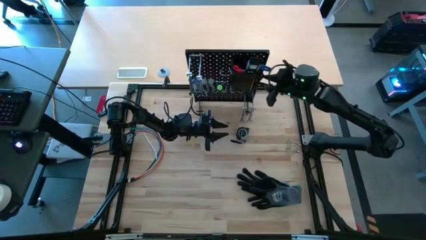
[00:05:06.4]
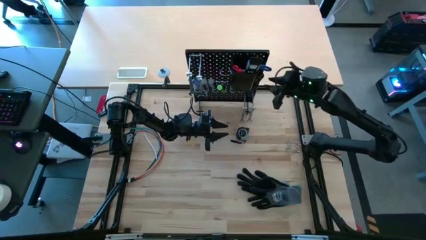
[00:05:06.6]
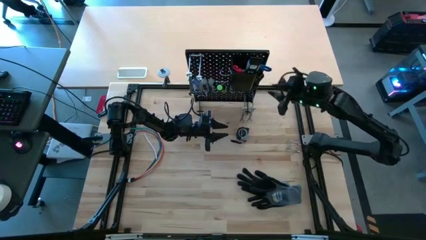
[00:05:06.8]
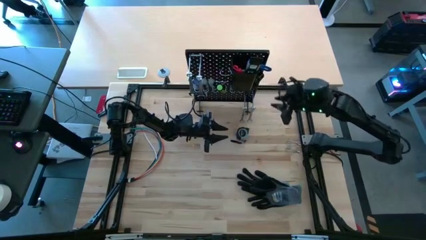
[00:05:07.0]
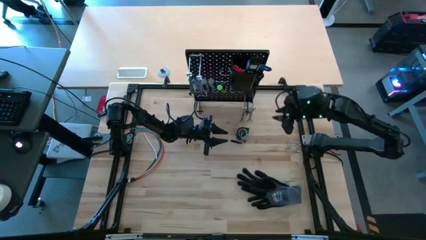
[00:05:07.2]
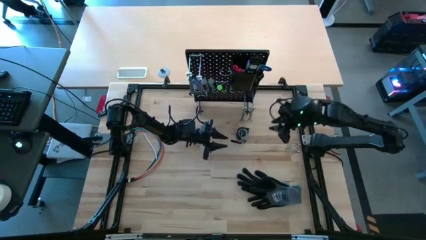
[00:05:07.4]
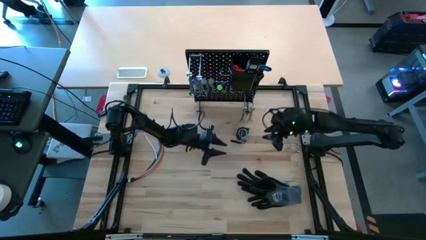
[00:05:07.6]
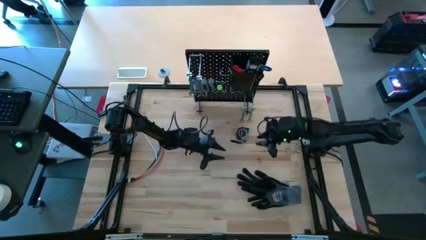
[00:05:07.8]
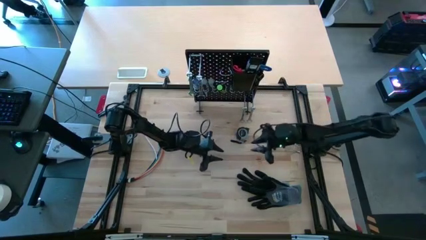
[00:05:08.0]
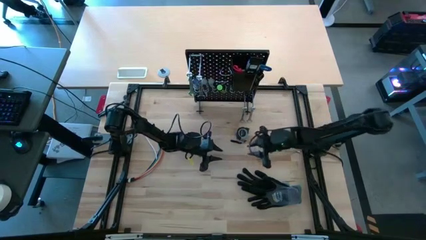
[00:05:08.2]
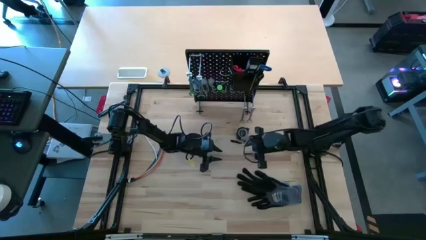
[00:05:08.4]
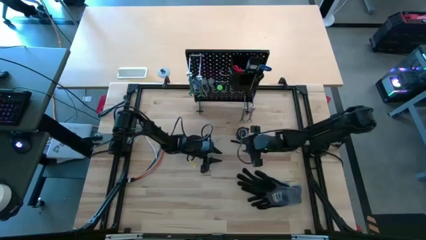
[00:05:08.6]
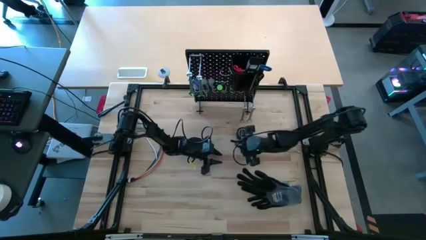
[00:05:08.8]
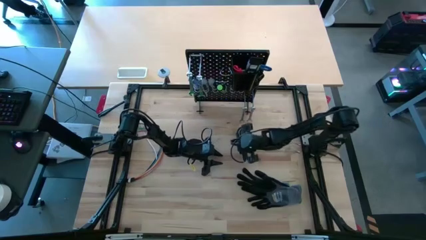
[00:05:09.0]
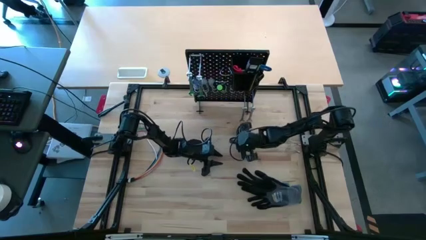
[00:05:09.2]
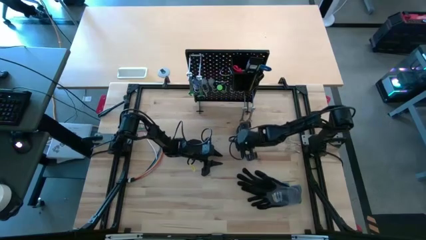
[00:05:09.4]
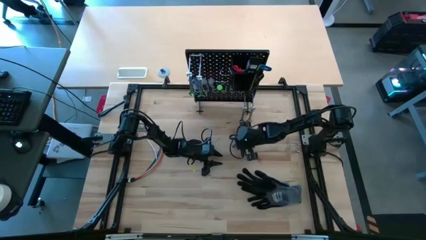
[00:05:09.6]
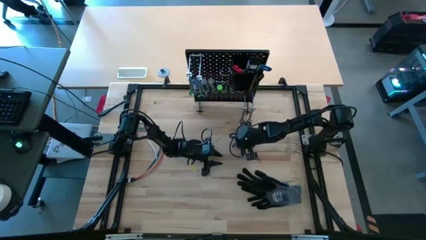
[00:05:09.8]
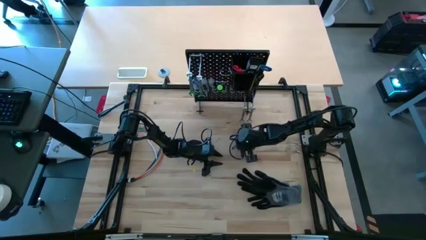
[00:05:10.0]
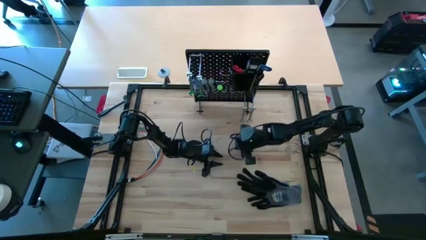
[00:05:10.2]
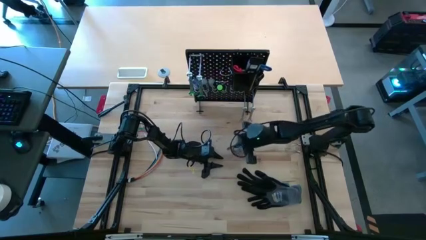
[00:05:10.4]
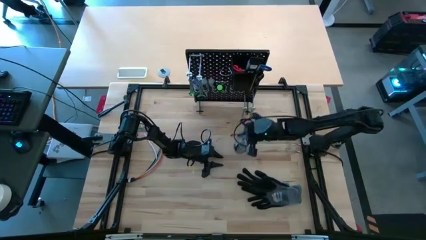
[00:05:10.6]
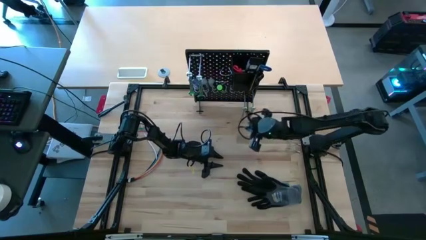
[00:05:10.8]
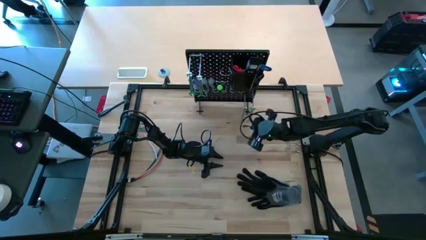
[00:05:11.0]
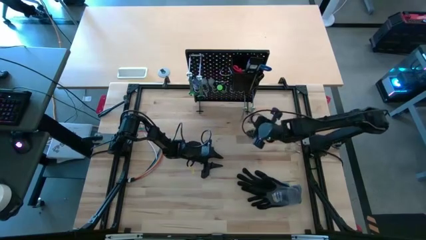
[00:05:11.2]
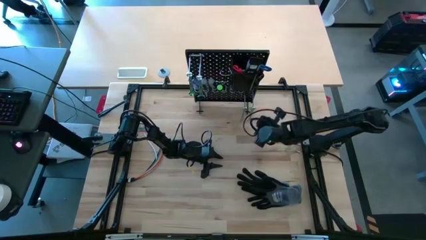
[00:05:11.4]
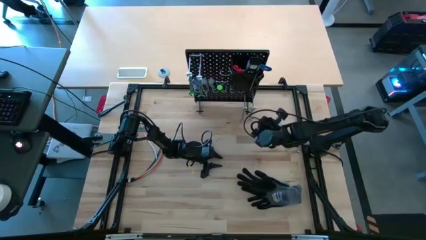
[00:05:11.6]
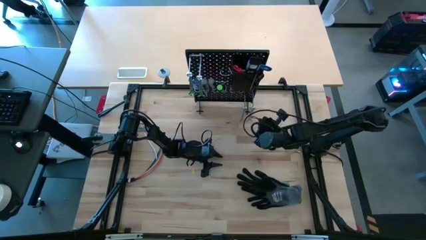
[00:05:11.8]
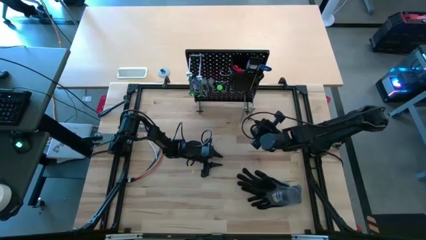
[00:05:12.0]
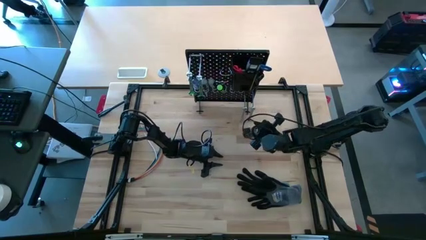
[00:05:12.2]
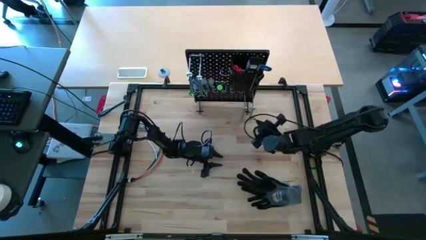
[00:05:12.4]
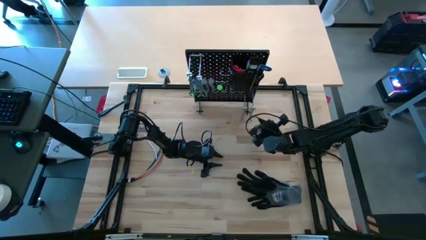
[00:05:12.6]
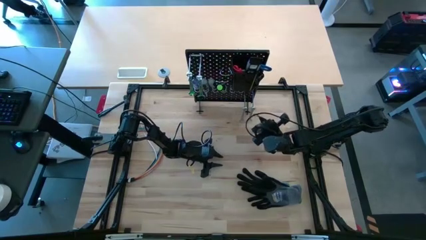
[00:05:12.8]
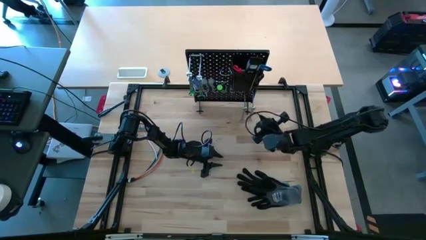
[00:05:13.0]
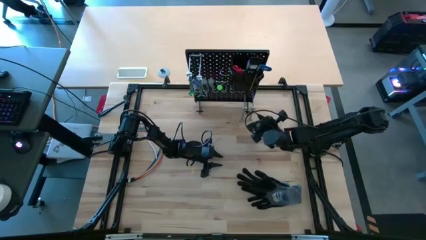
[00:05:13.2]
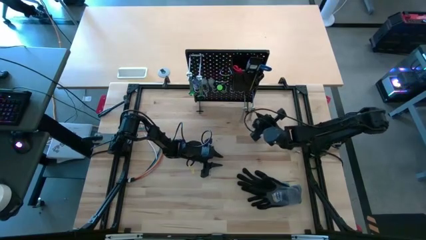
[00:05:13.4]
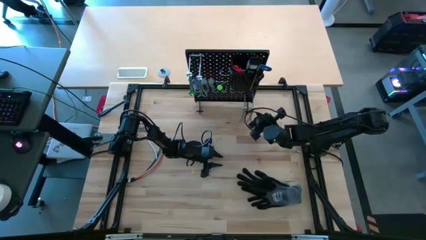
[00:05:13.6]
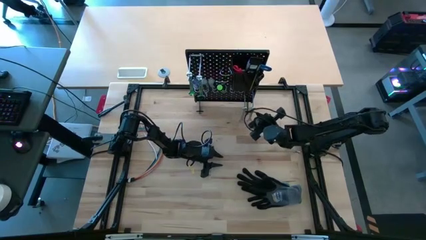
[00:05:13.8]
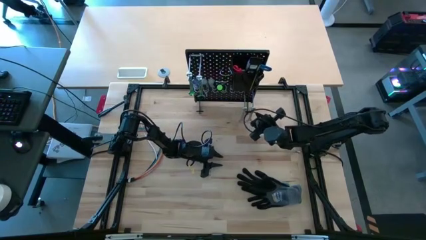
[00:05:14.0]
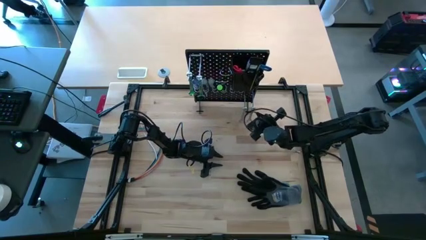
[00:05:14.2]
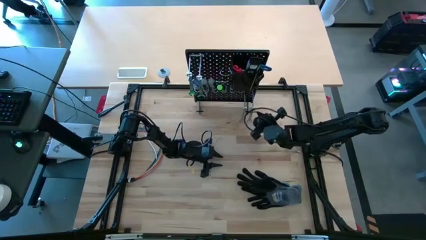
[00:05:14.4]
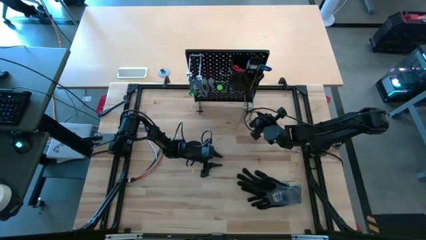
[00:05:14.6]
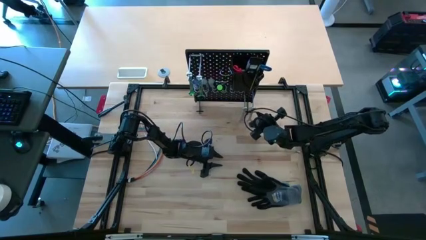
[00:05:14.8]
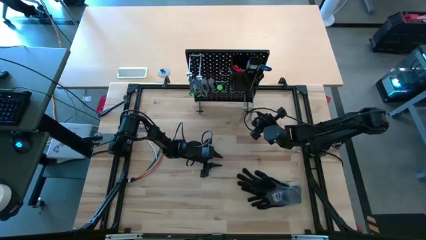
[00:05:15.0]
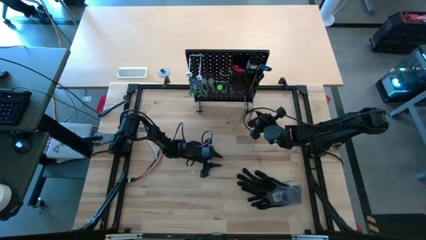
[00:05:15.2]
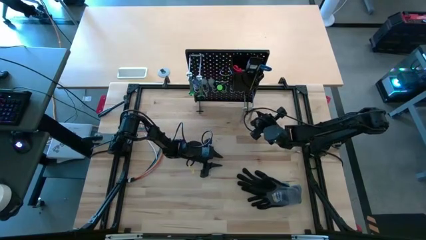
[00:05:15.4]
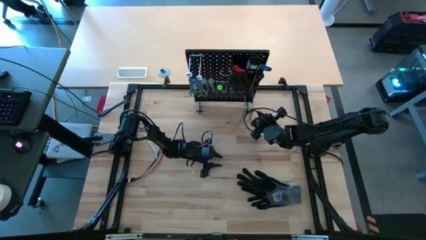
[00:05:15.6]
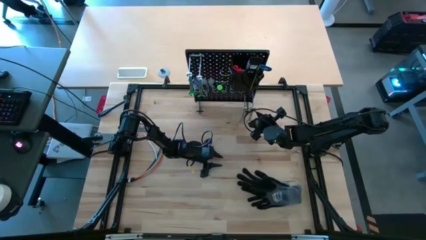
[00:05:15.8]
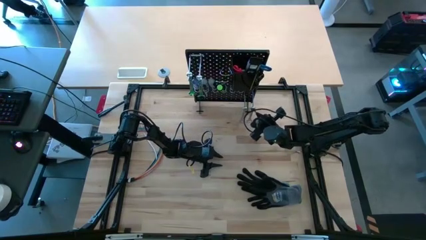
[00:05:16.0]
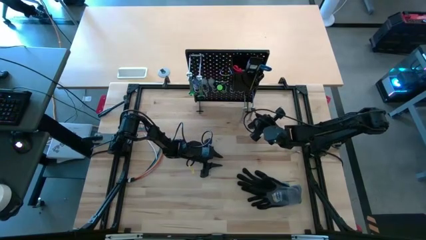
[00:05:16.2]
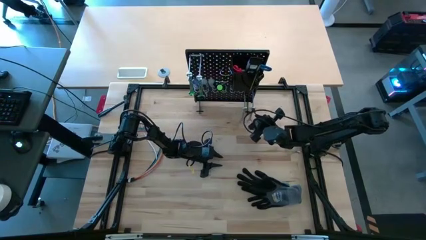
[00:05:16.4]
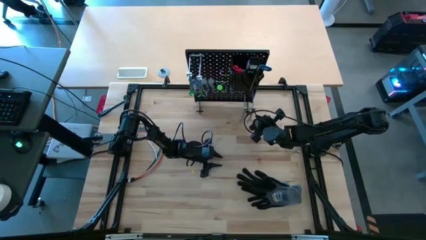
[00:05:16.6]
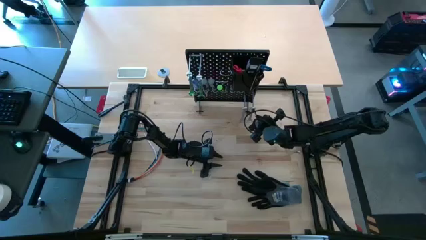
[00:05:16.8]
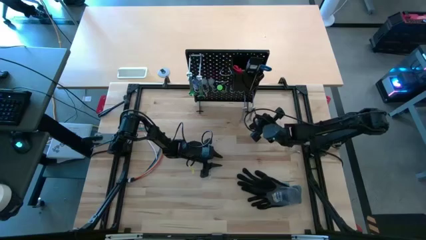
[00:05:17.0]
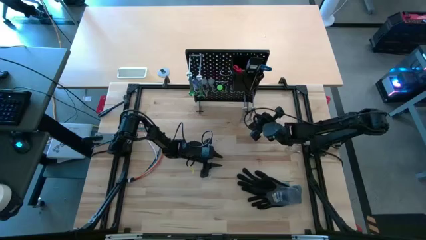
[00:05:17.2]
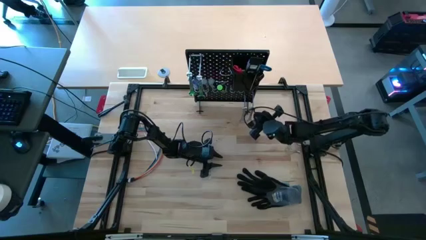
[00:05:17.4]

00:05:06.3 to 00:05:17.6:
Task: Hang tools onto peg board
Hang the gray tape measure on the peg board
